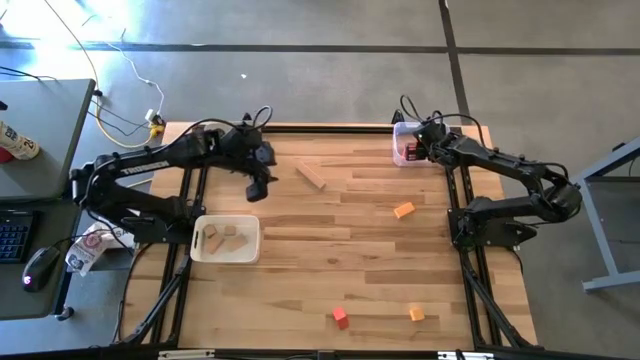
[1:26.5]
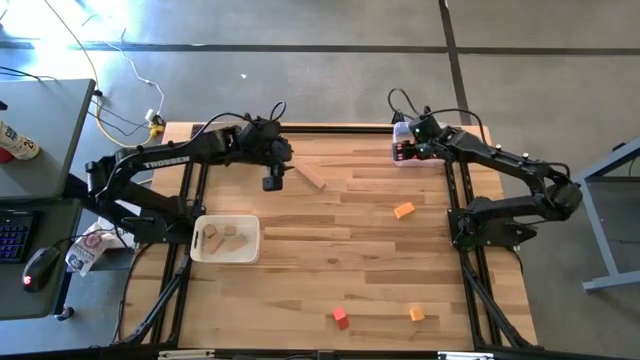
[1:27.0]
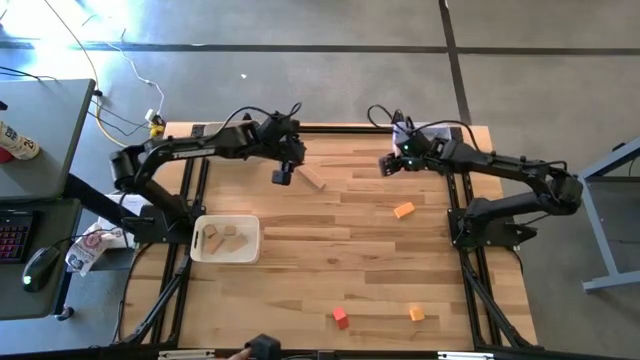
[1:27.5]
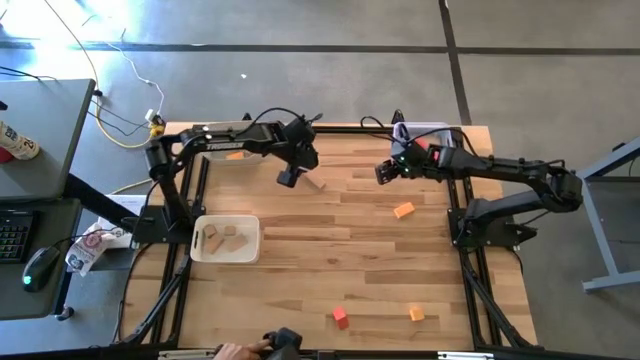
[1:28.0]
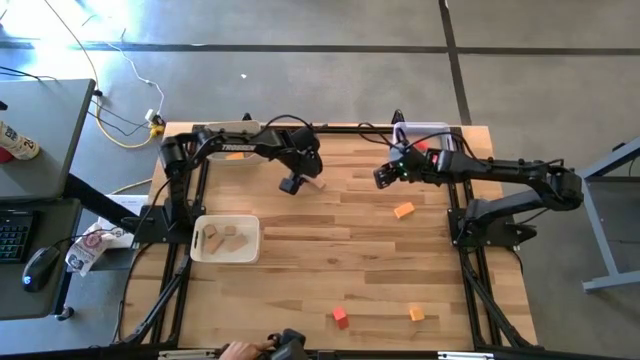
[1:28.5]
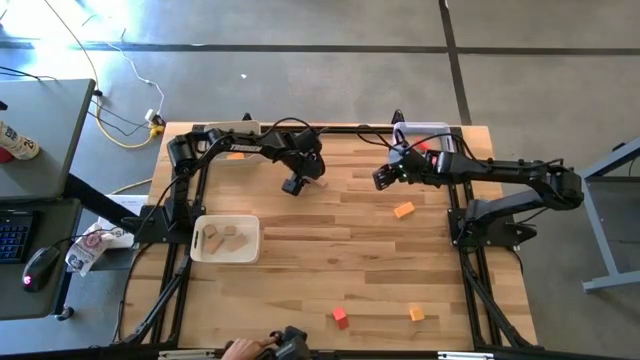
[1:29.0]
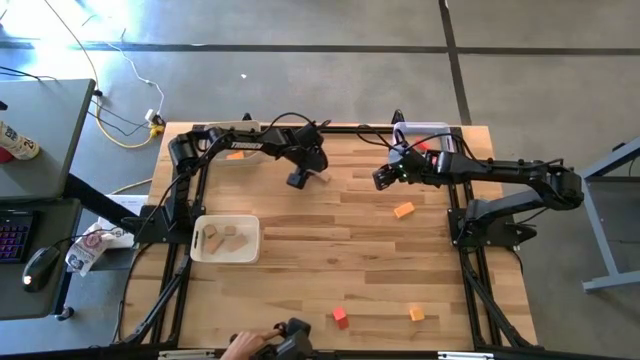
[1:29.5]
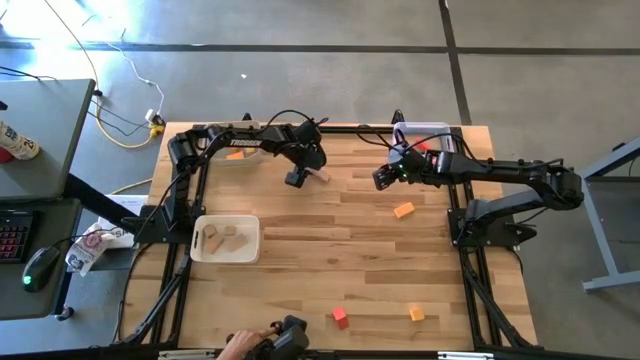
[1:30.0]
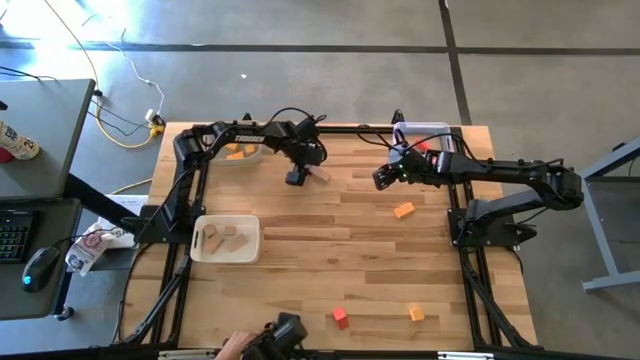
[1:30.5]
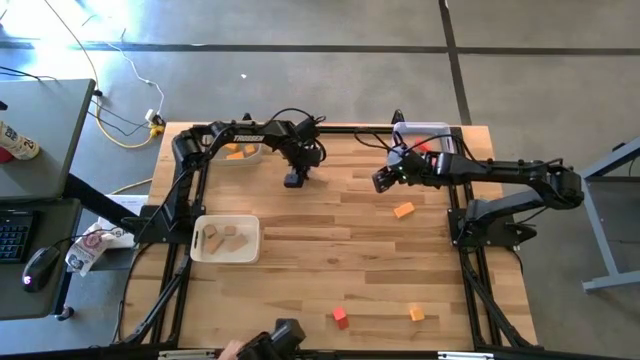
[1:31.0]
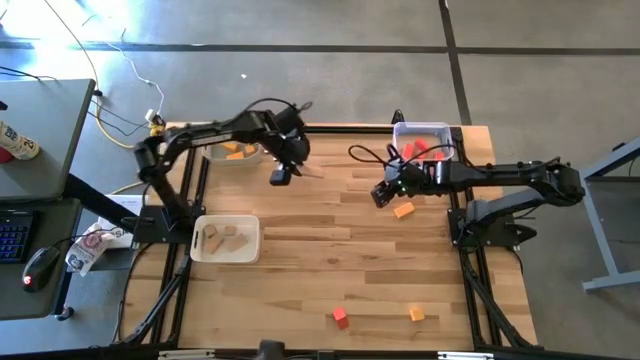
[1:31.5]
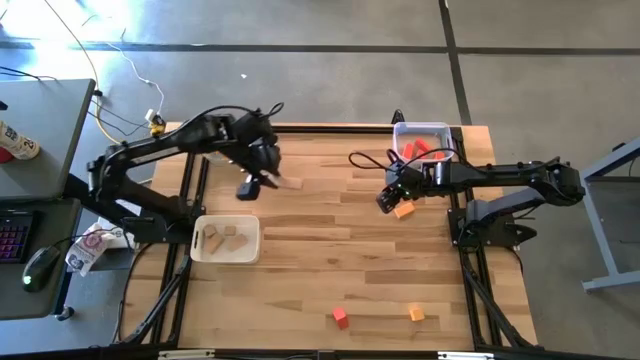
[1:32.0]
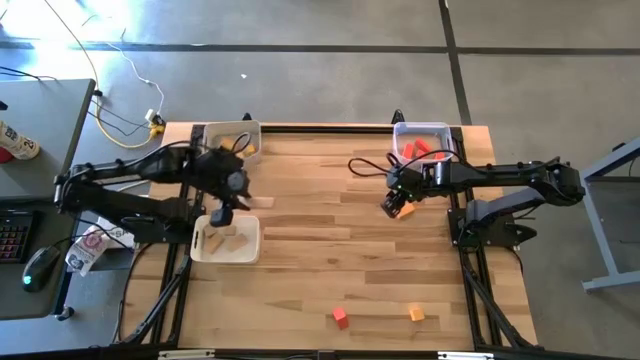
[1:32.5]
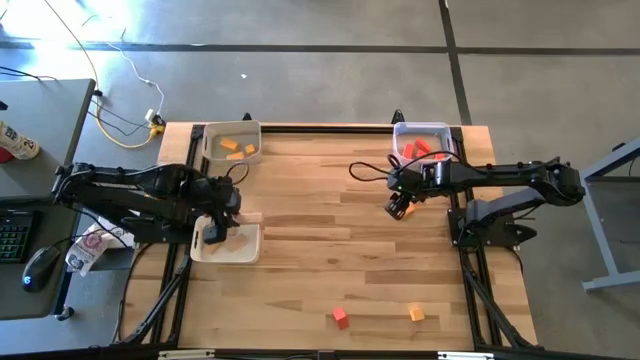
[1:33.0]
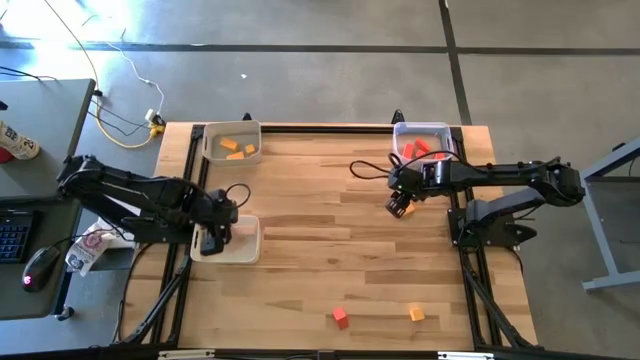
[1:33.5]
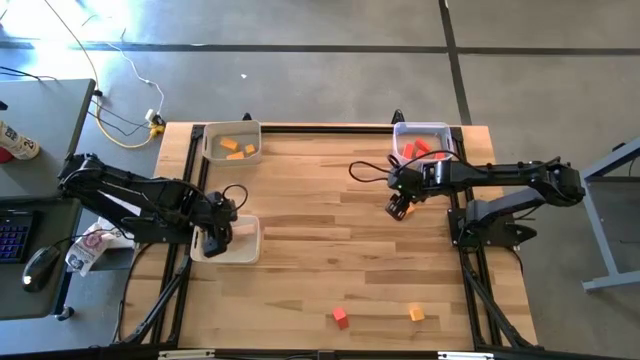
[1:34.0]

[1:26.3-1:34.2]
Task: Sort & place blocks by color
Put the brown block into the white bin

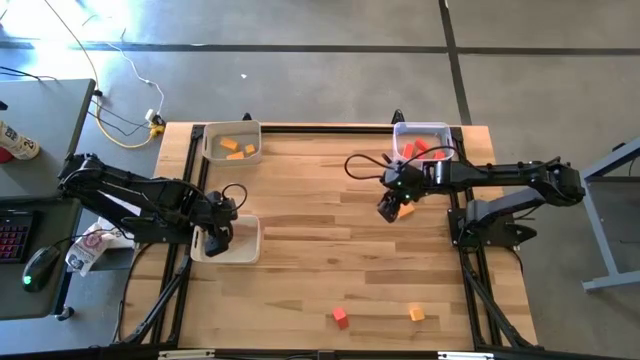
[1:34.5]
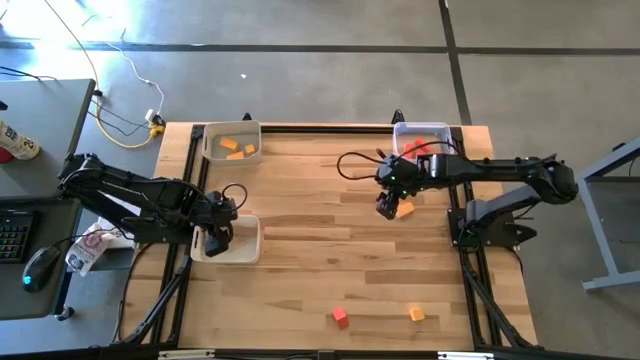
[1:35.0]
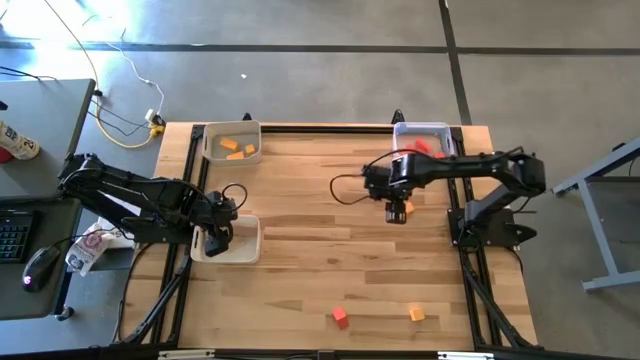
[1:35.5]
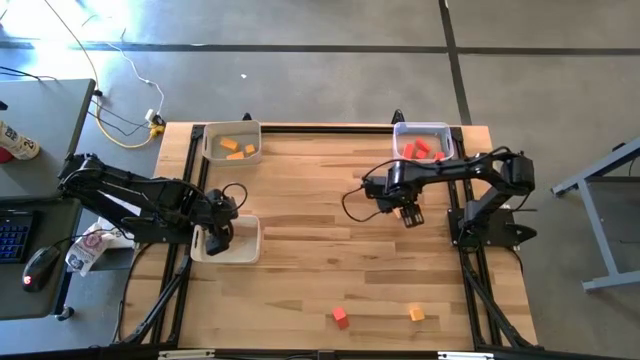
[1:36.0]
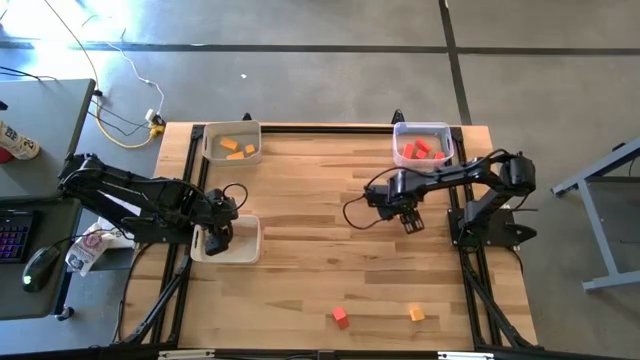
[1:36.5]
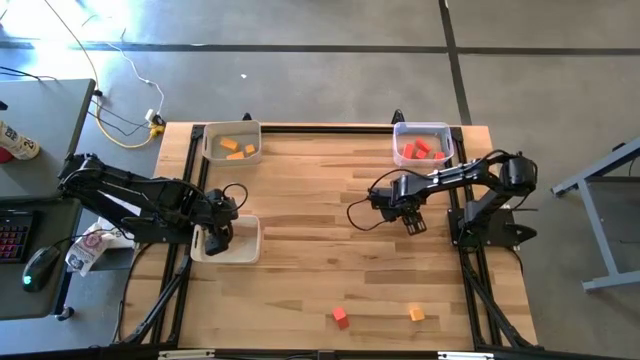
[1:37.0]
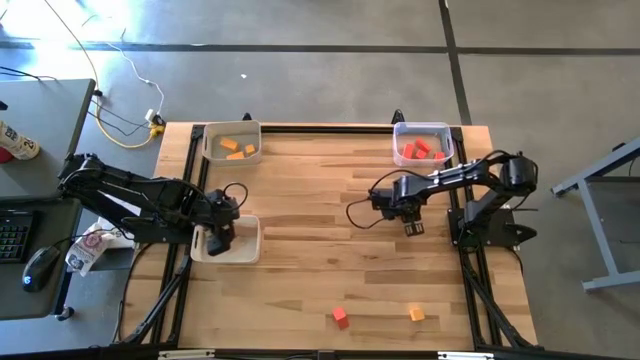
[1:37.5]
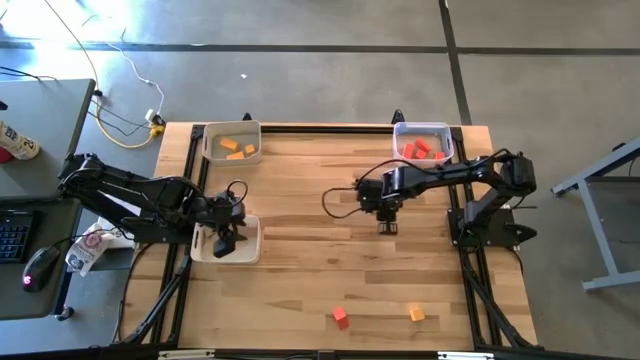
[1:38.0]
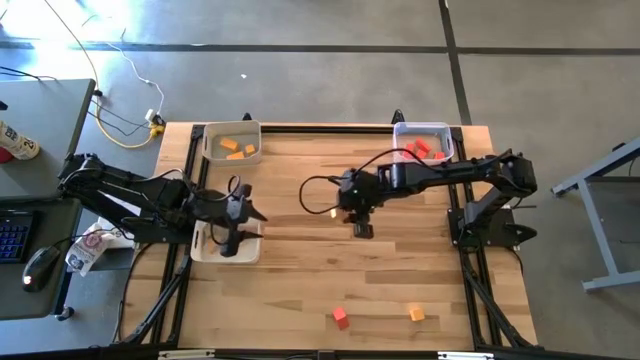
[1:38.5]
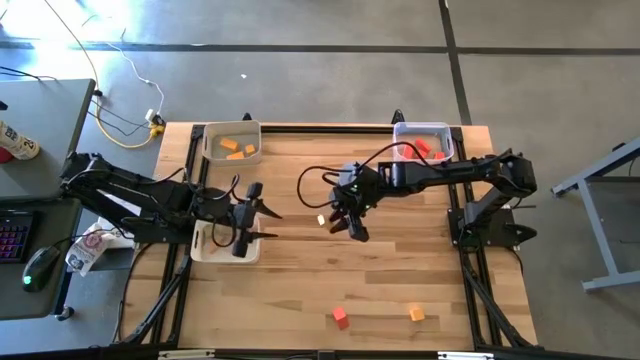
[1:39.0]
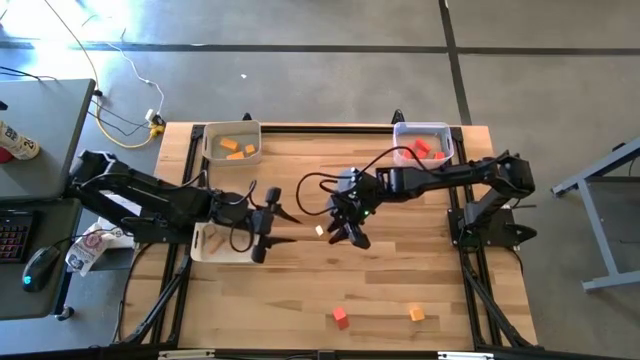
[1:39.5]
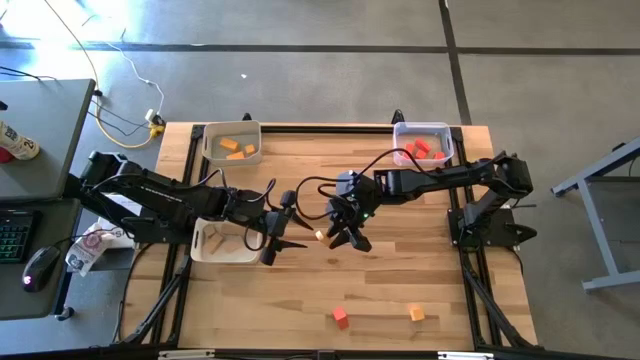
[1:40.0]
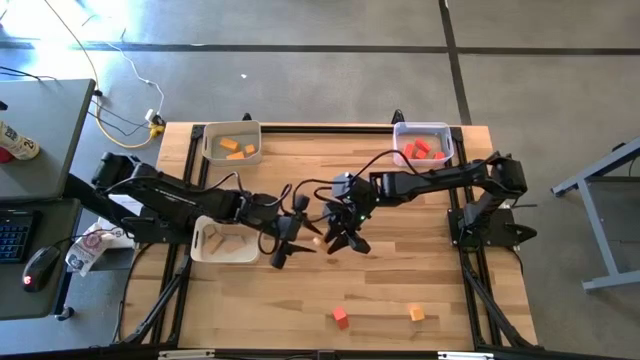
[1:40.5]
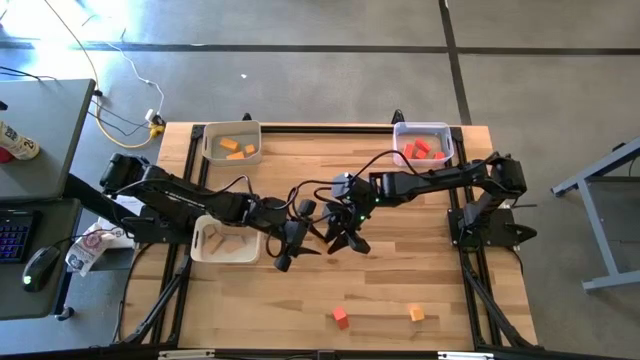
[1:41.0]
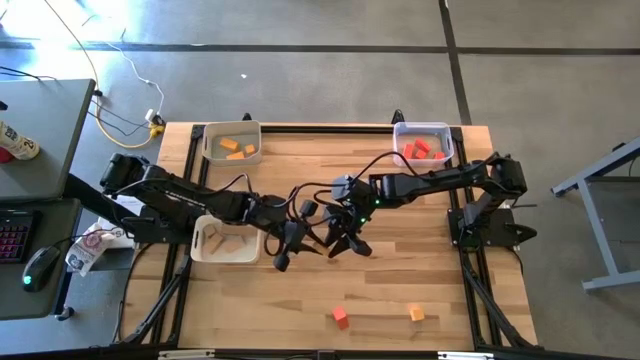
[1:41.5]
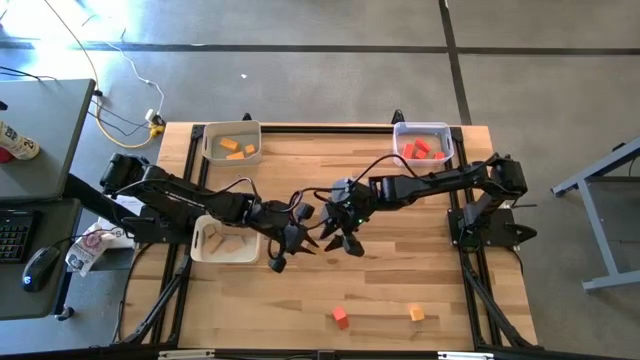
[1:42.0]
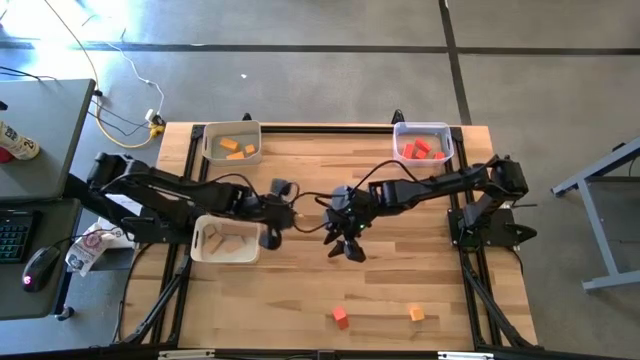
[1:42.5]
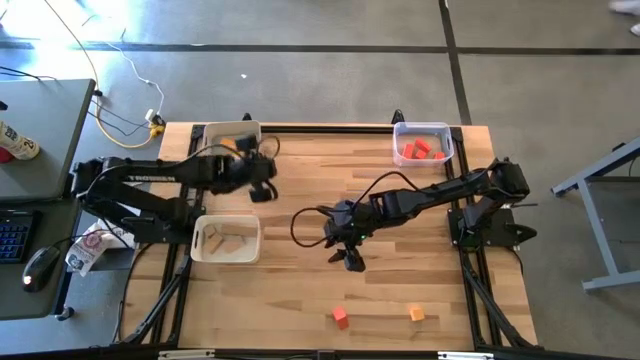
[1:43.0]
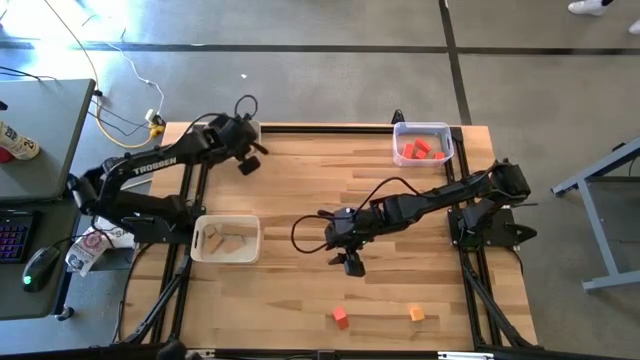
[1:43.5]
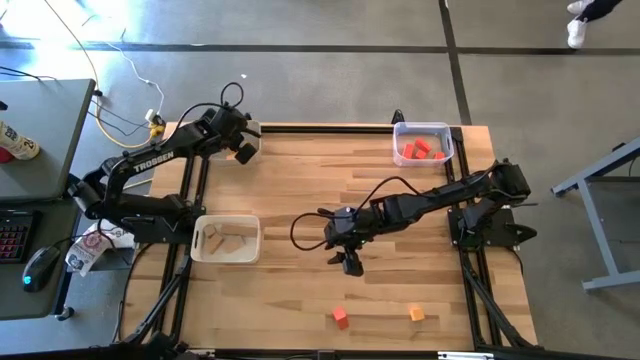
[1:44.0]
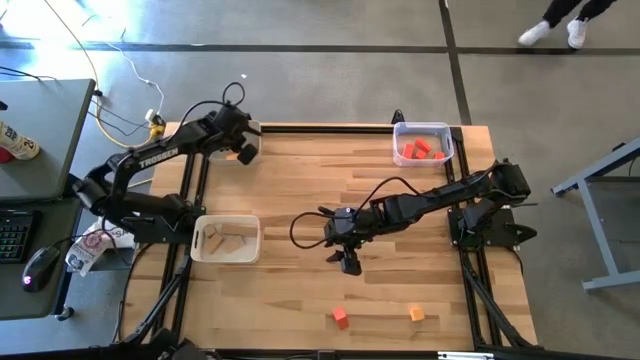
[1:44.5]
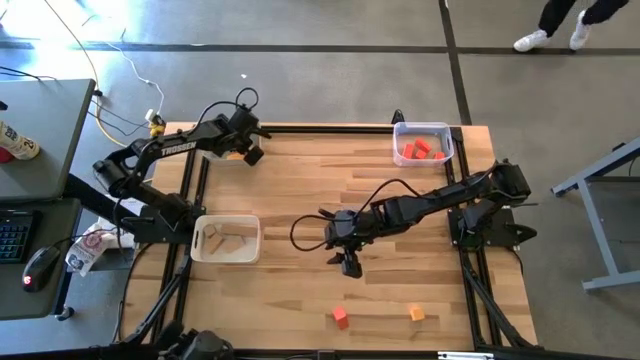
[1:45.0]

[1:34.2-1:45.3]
Put the yellow block into the gray bin

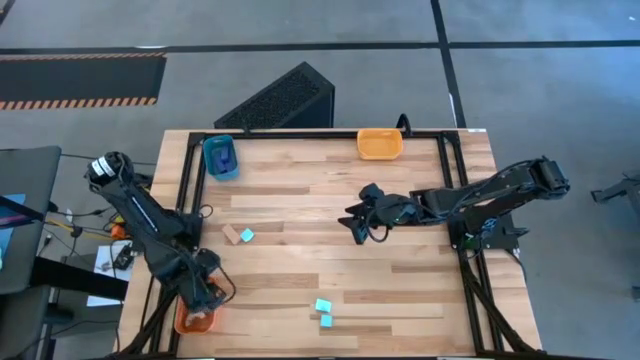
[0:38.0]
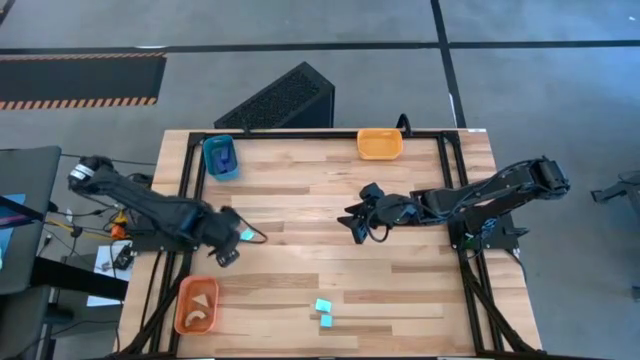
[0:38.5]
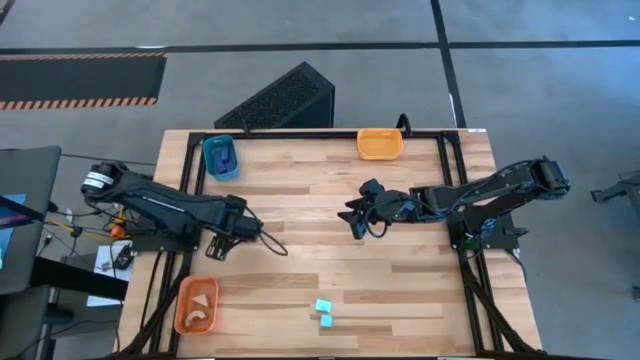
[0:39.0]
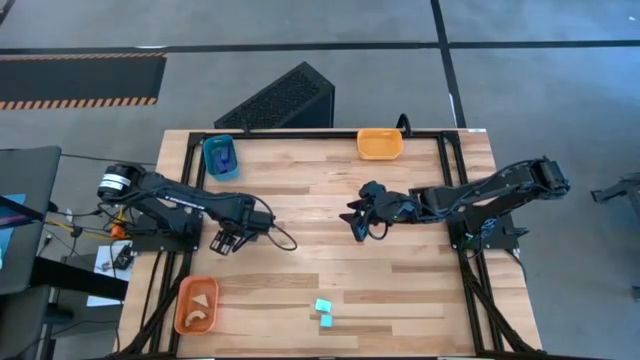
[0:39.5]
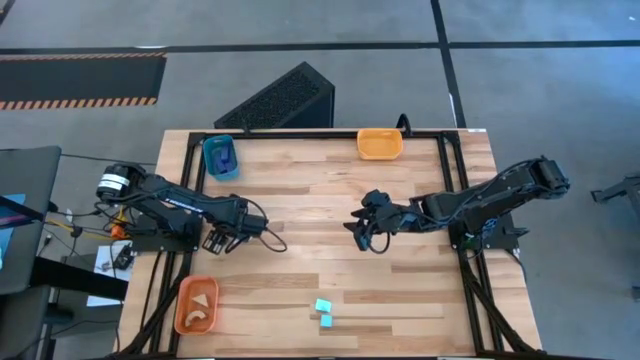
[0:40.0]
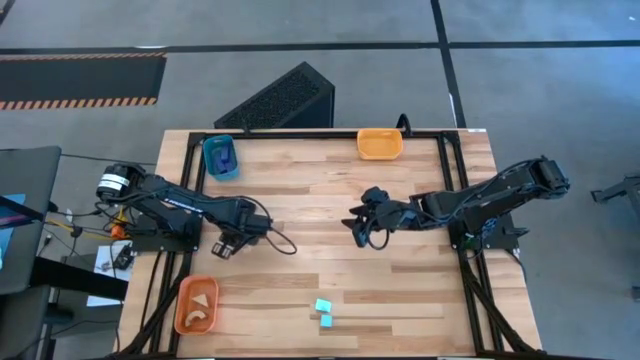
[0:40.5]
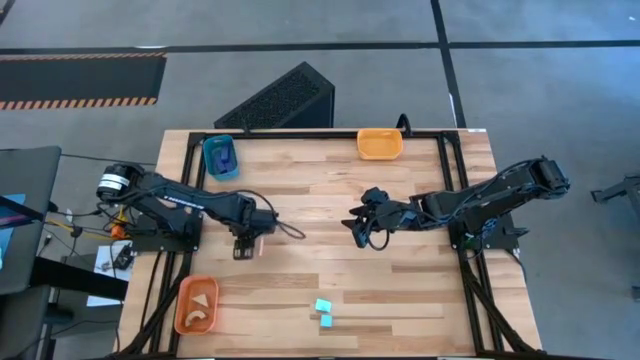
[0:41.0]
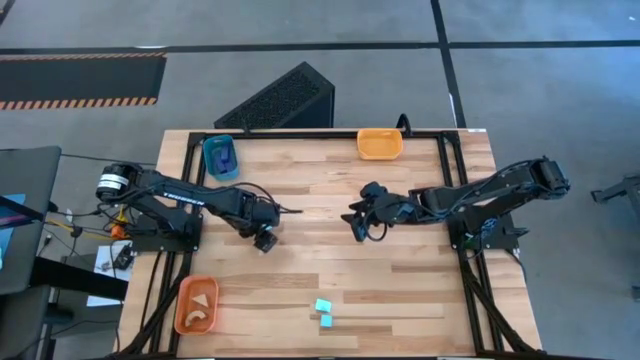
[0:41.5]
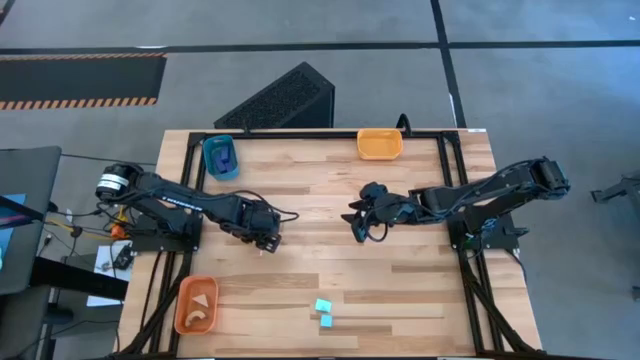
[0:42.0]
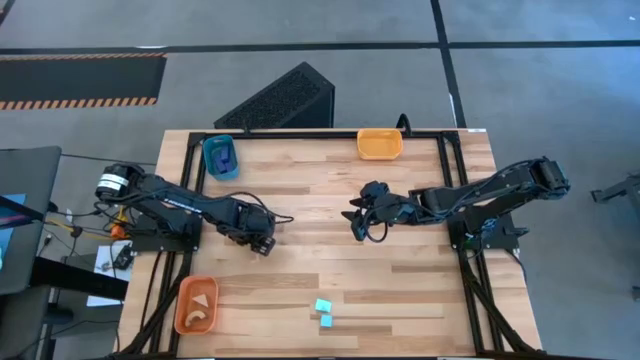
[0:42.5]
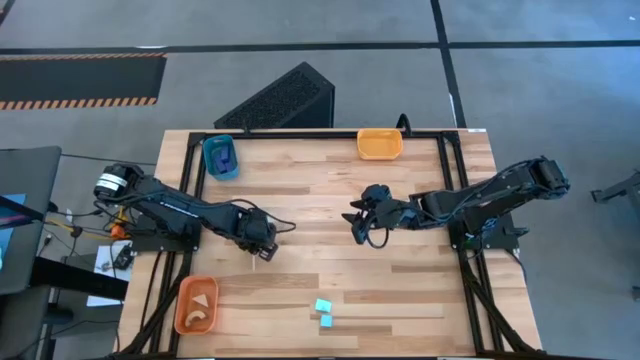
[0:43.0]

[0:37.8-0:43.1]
Task: Sort & place blocks by color
Put the brown block into the orange bin
